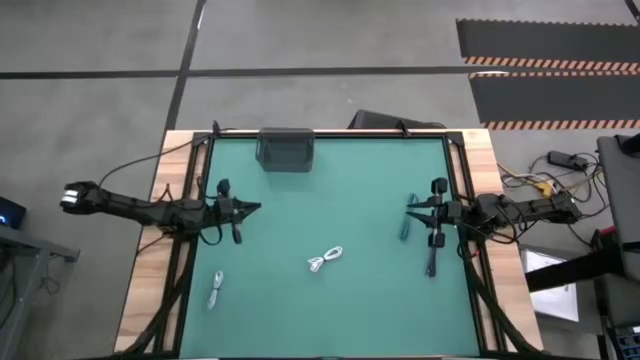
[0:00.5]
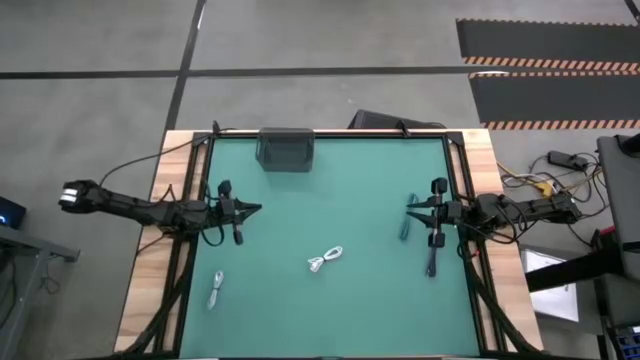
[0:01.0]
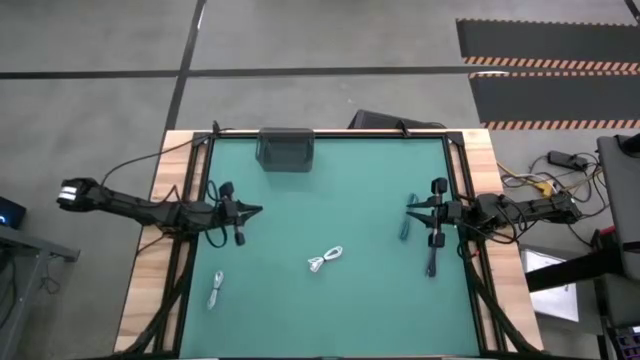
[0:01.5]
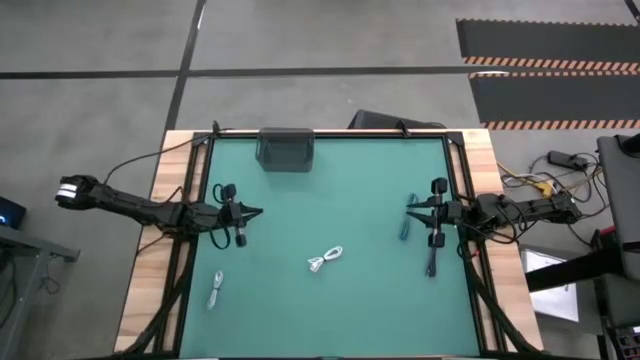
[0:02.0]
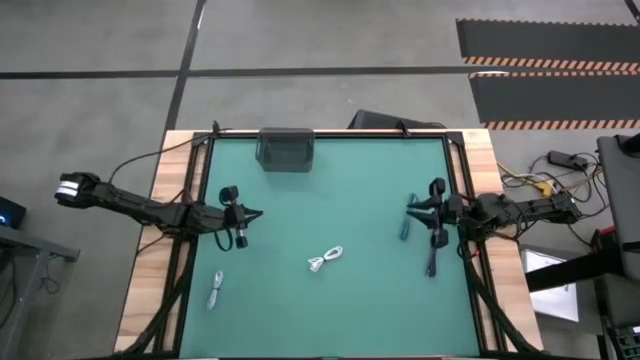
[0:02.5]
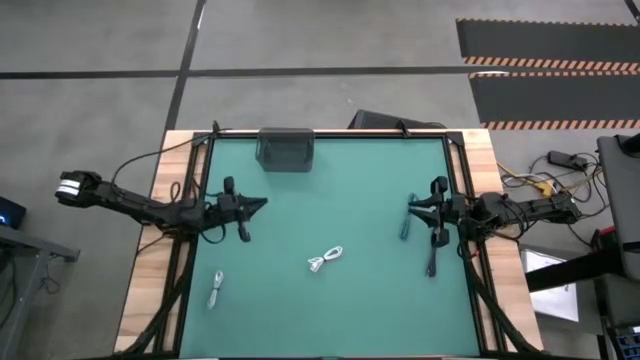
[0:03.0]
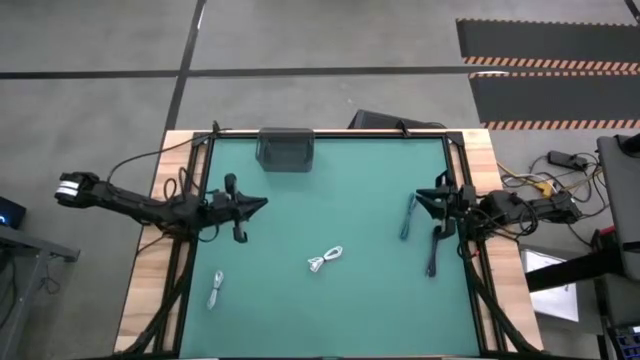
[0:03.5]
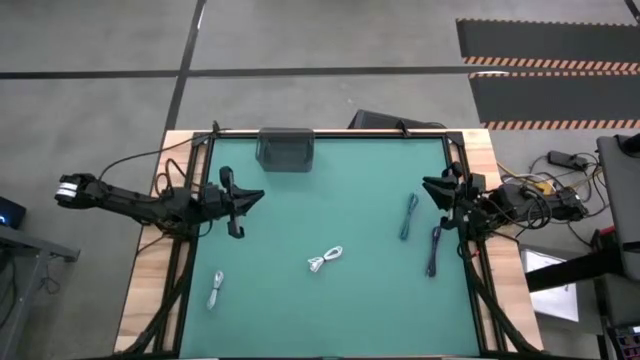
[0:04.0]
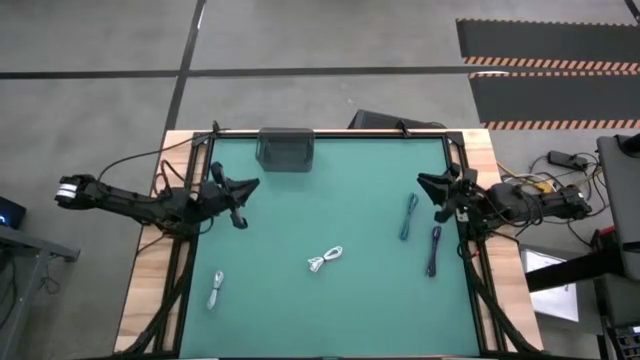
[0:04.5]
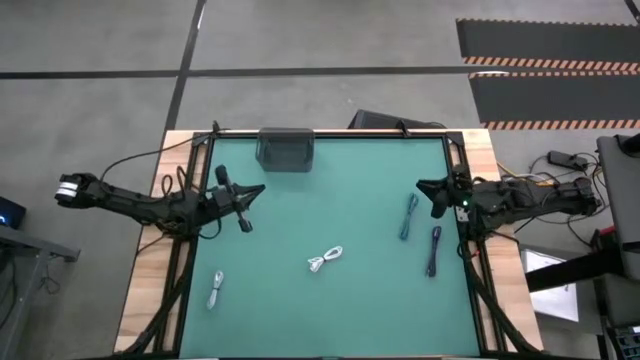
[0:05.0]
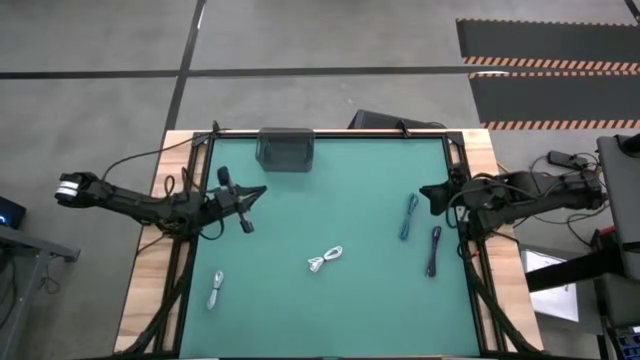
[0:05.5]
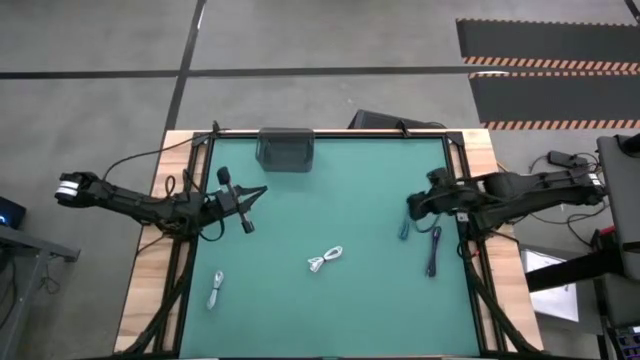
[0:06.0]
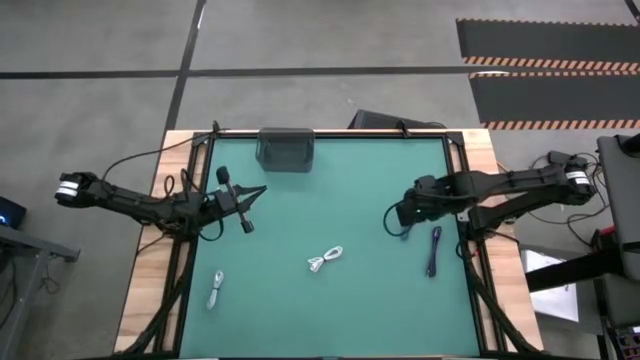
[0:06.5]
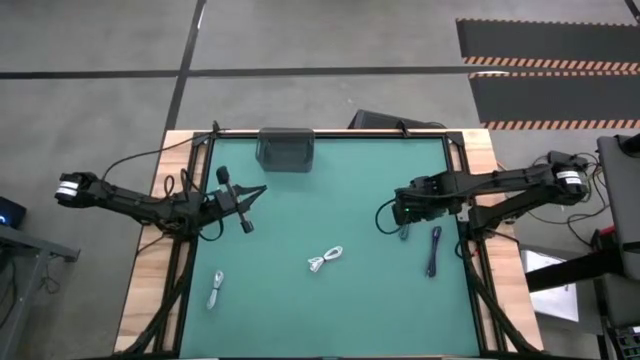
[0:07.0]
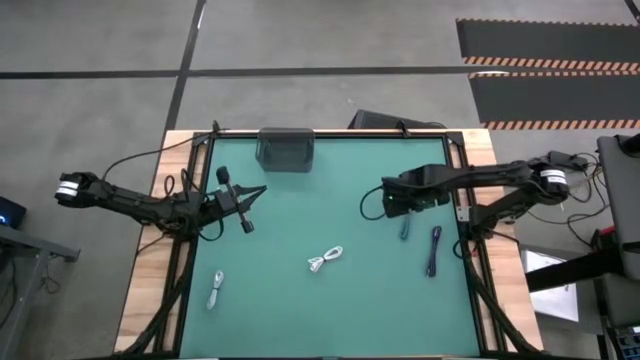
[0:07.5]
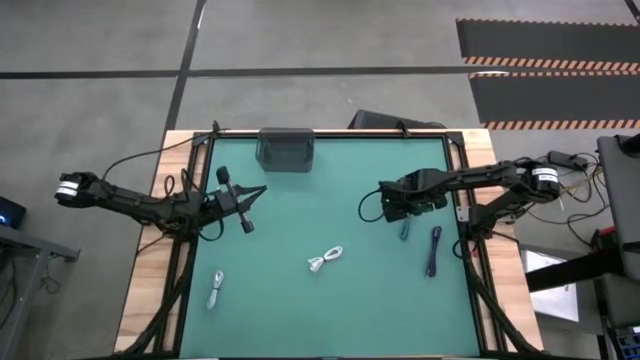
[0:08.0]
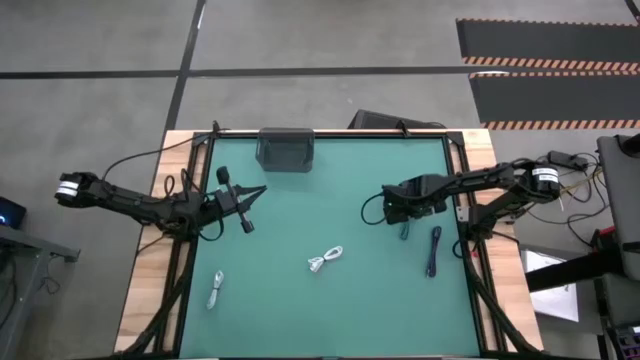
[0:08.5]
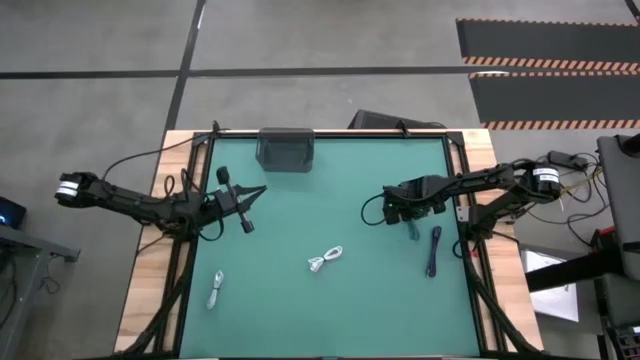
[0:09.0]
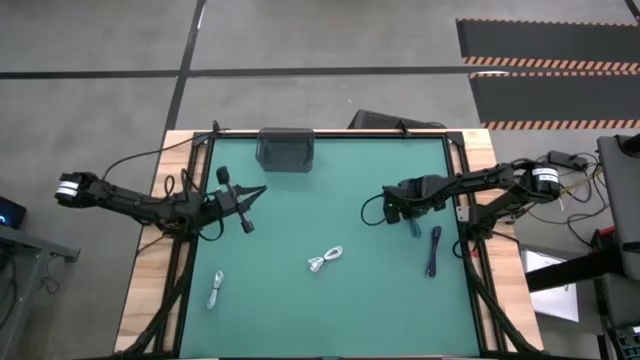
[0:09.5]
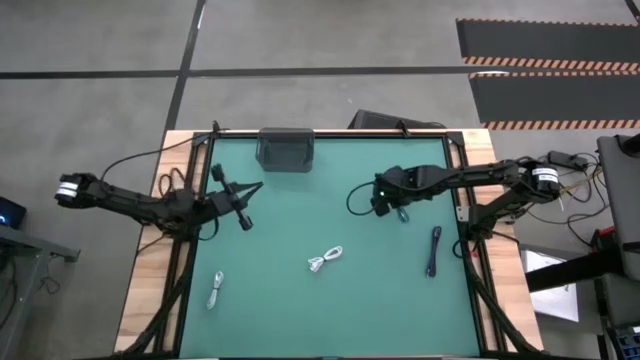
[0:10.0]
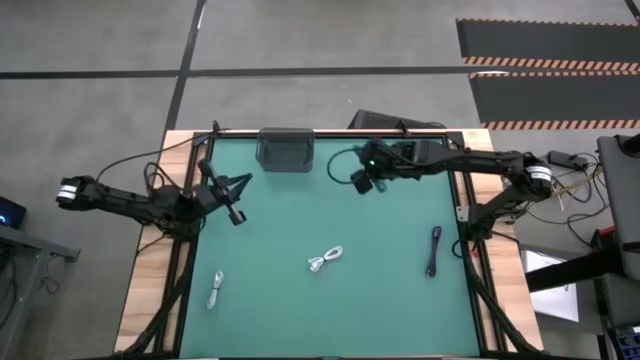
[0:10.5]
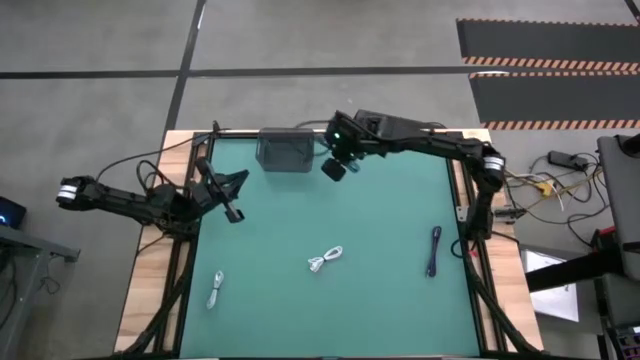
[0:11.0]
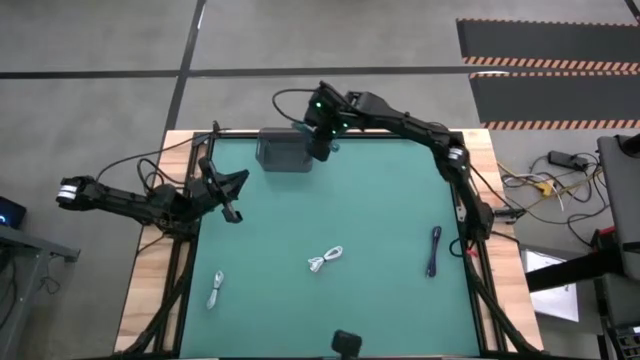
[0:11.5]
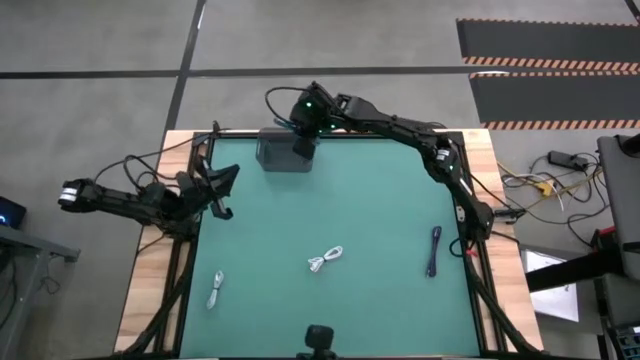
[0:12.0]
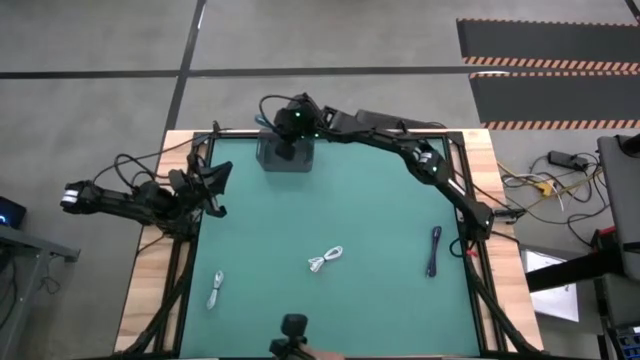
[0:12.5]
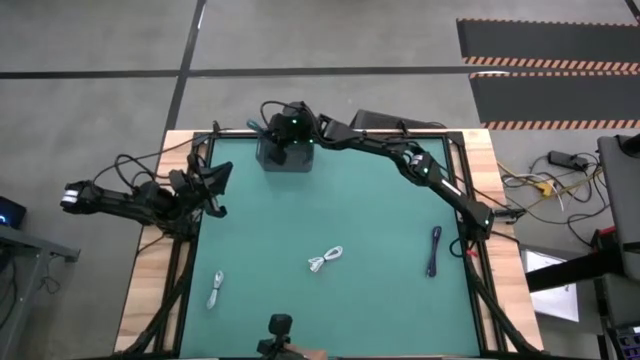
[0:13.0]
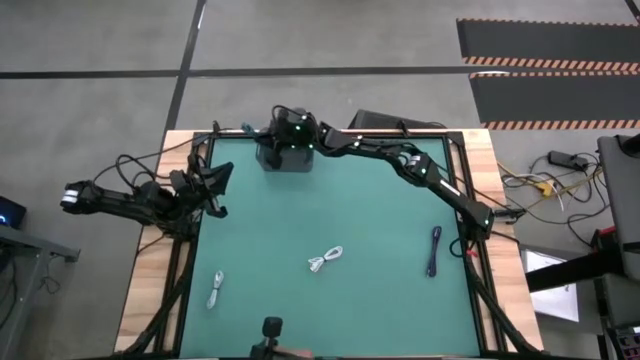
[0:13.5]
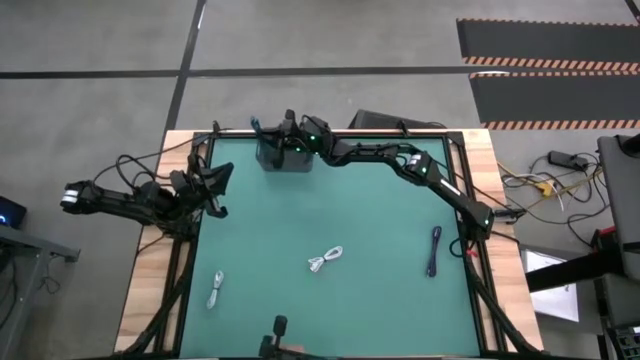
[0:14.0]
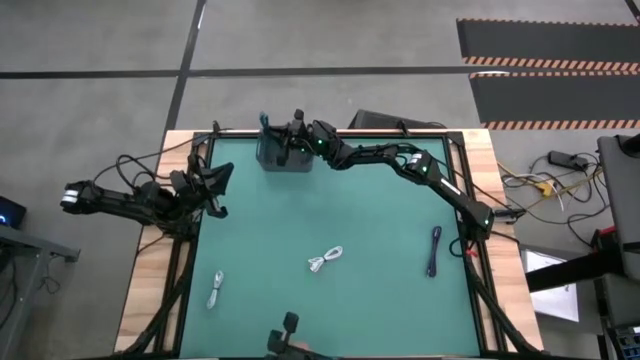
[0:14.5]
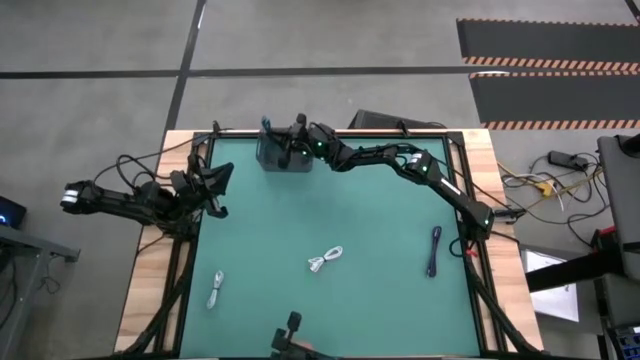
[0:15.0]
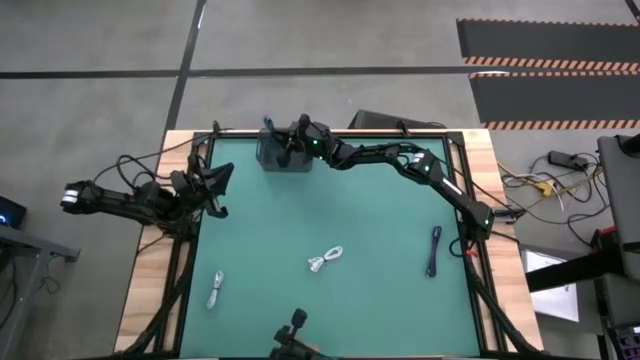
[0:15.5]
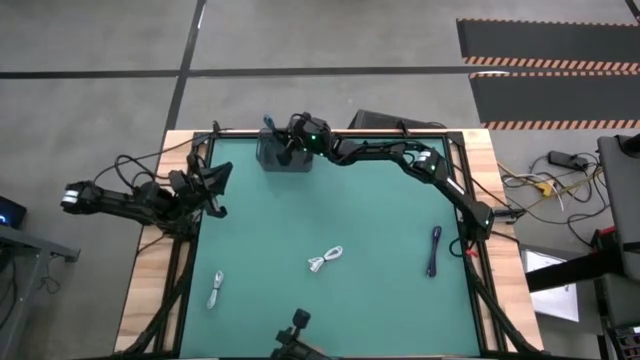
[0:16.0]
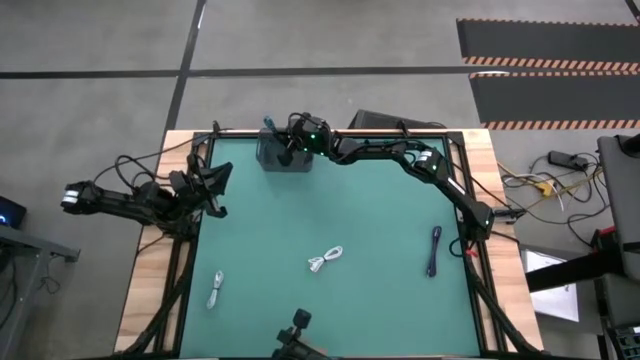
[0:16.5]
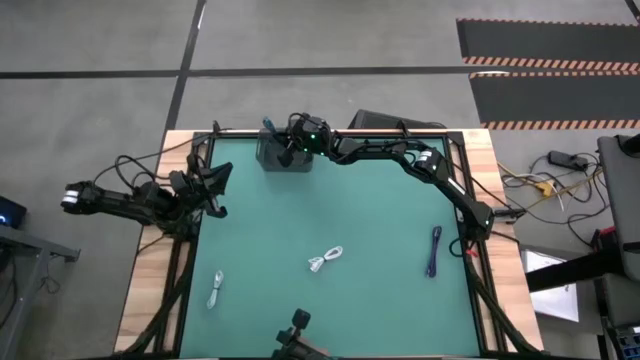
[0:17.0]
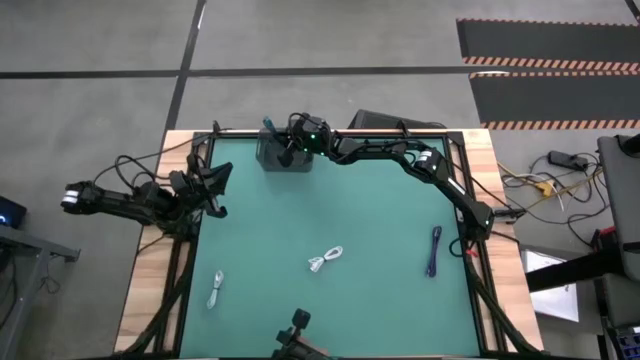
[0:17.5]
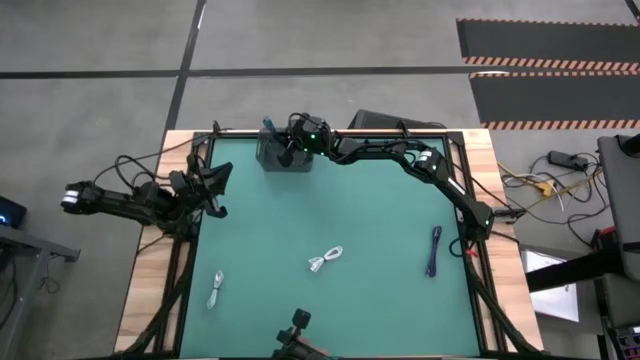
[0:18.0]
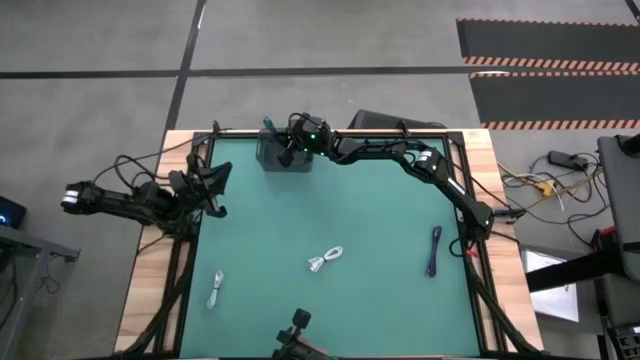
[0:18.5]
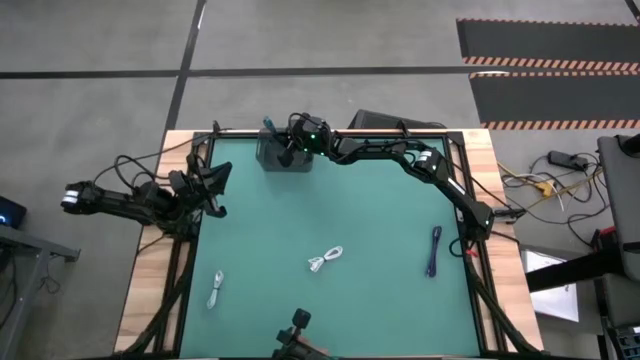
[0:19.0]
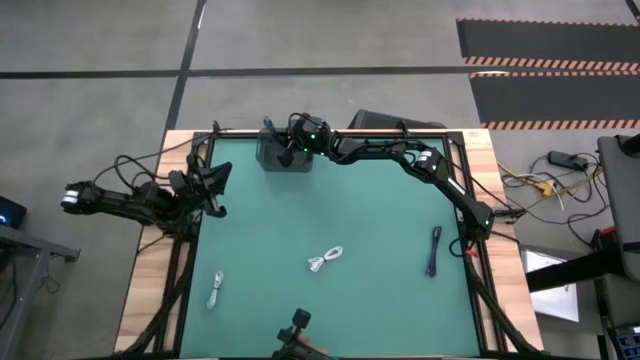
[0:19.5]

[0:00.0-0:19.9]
Task: Pick and place USB-C Cables
Put the blue charger cable into the bin
